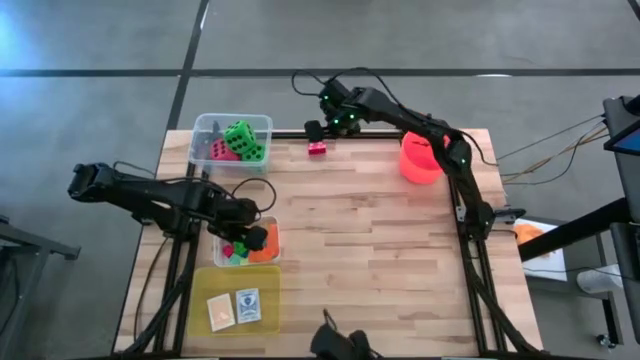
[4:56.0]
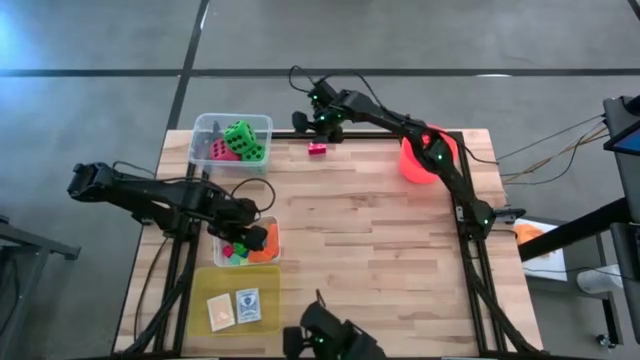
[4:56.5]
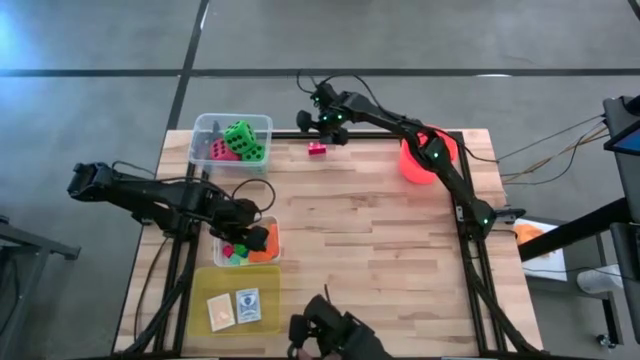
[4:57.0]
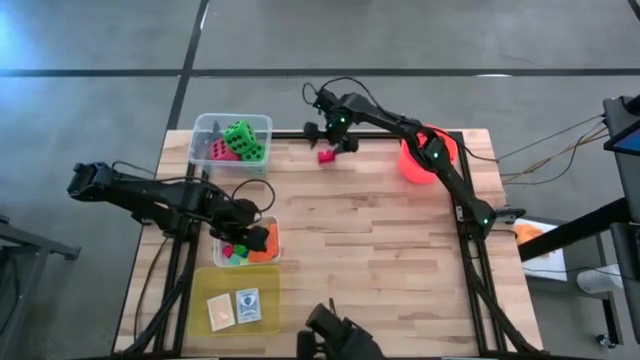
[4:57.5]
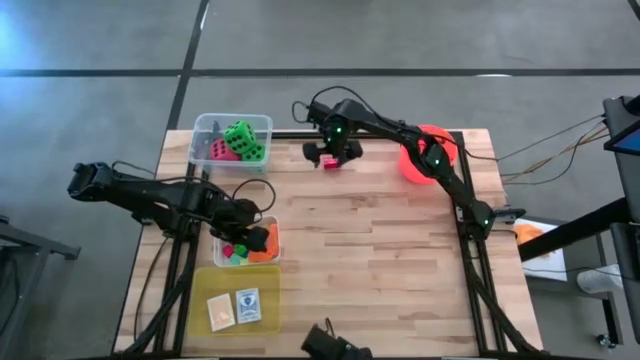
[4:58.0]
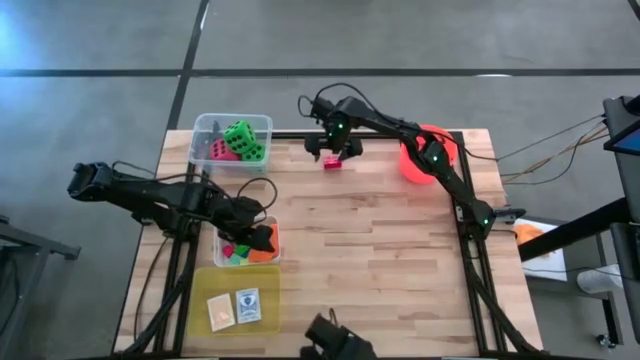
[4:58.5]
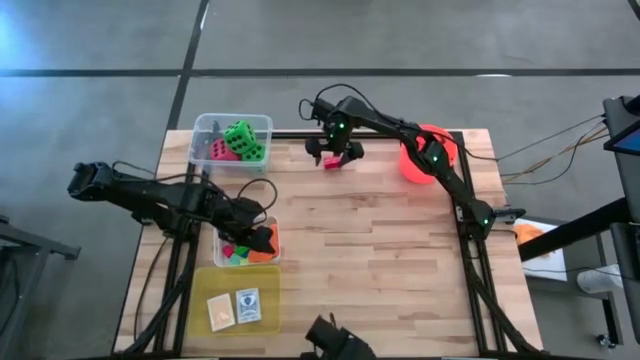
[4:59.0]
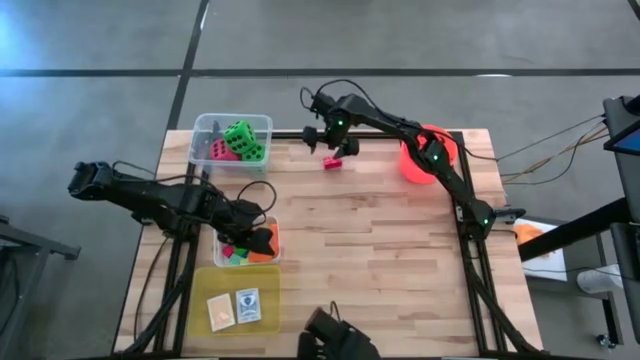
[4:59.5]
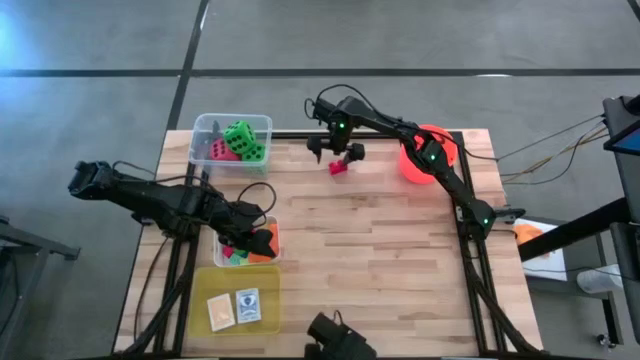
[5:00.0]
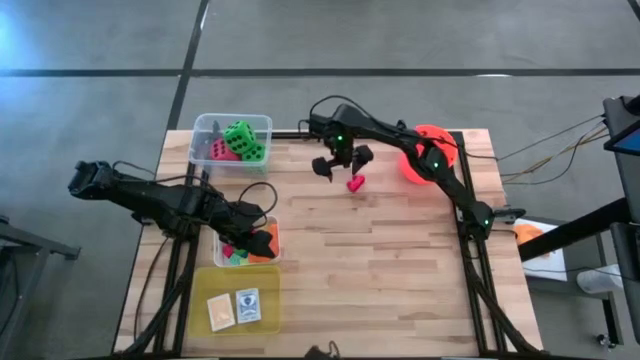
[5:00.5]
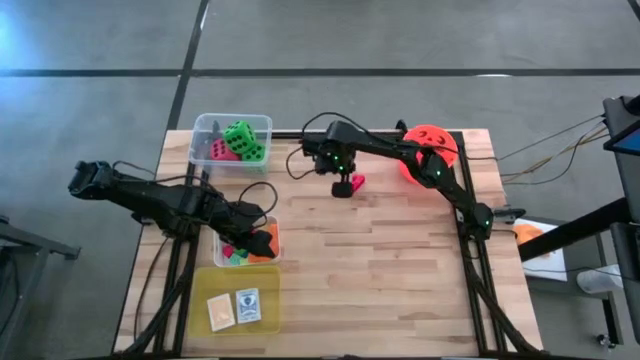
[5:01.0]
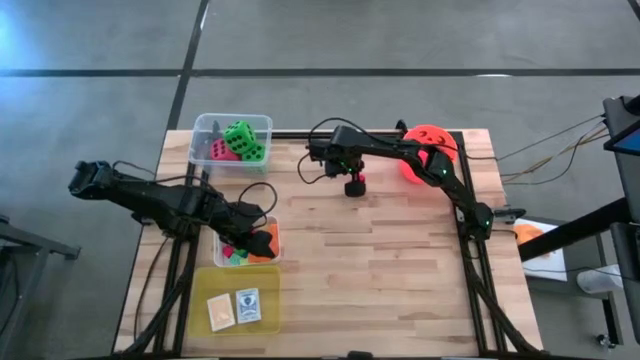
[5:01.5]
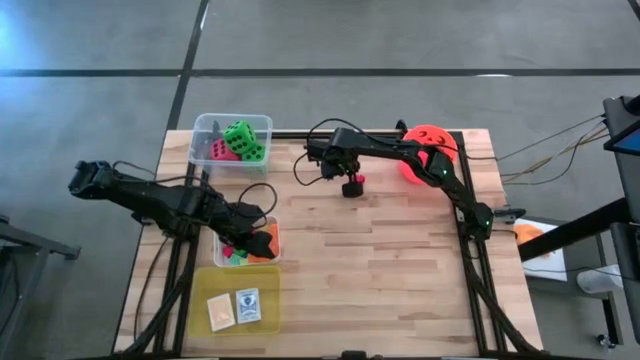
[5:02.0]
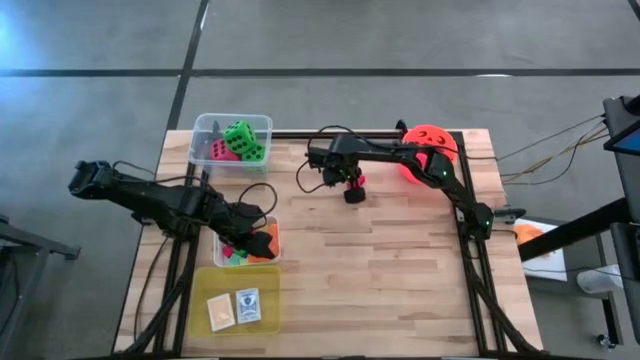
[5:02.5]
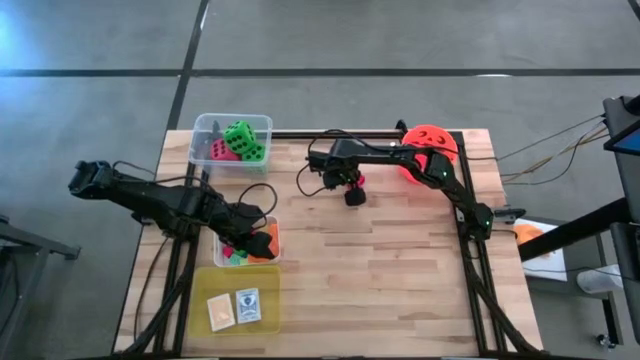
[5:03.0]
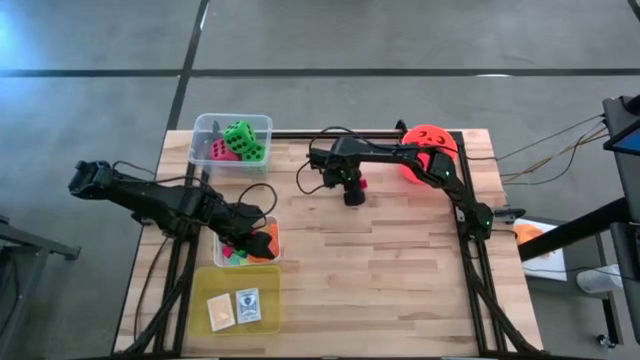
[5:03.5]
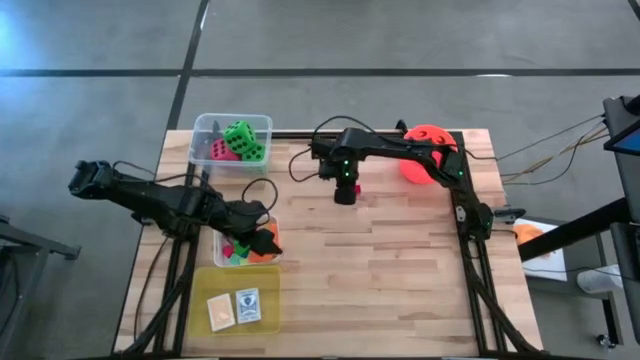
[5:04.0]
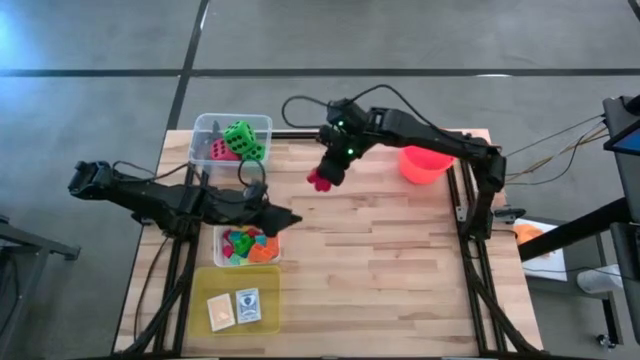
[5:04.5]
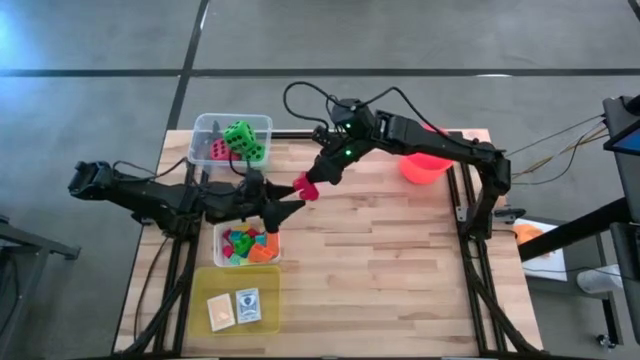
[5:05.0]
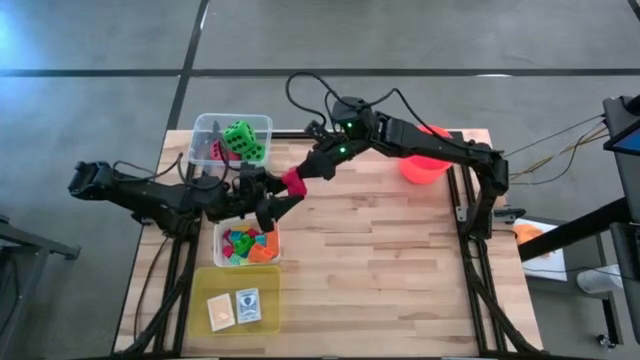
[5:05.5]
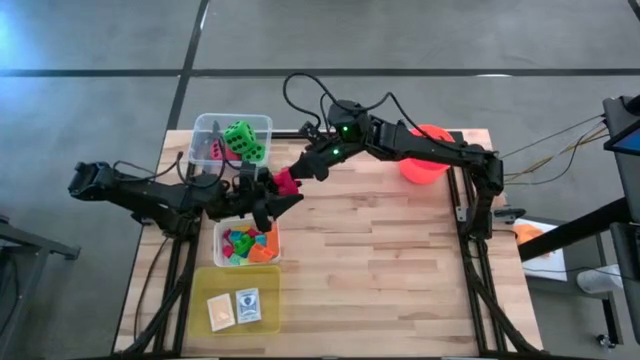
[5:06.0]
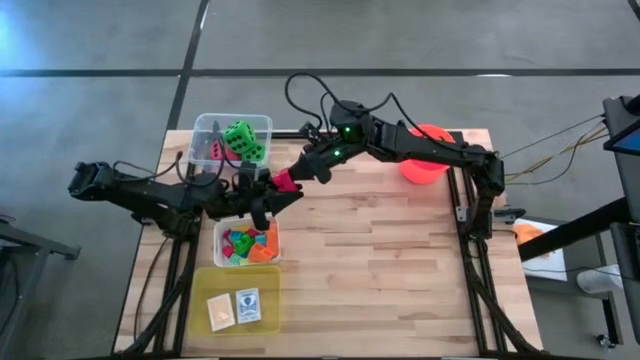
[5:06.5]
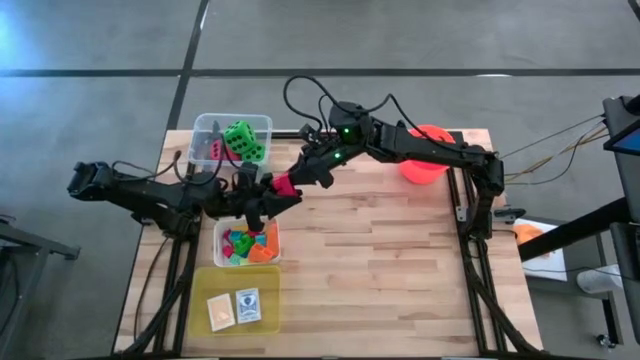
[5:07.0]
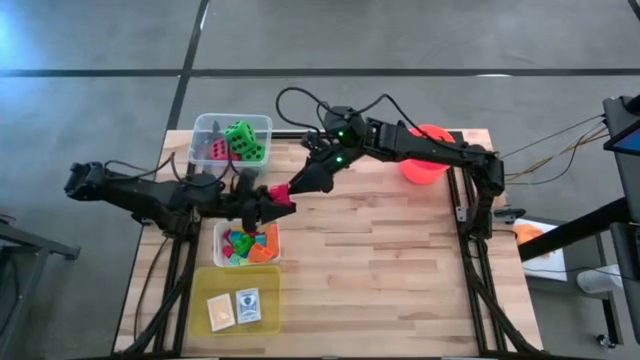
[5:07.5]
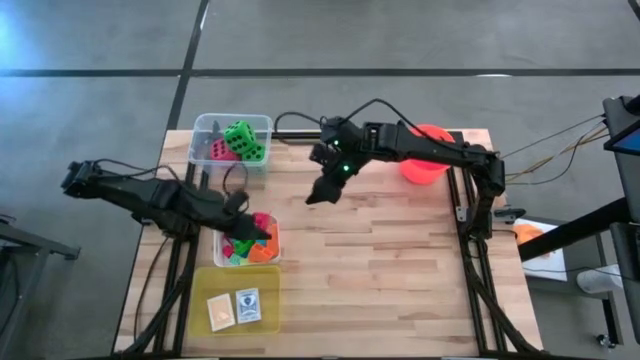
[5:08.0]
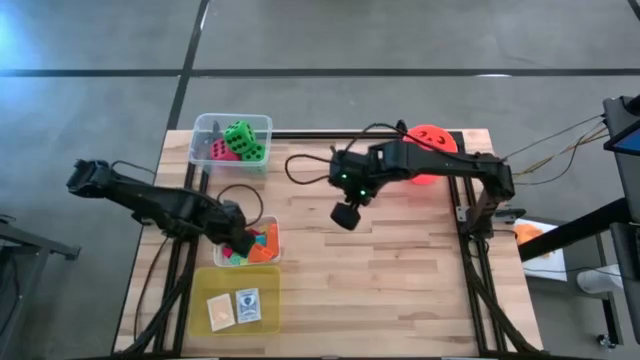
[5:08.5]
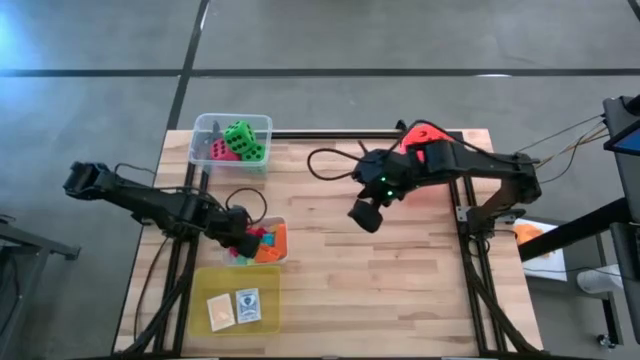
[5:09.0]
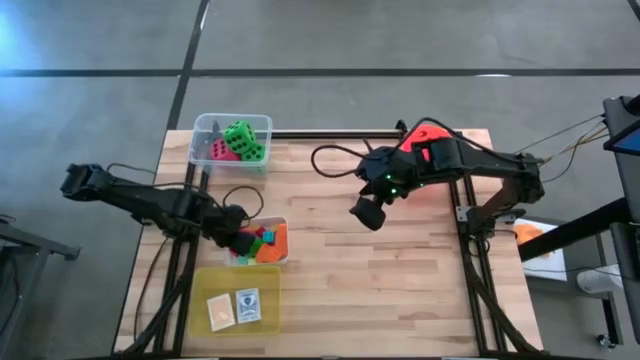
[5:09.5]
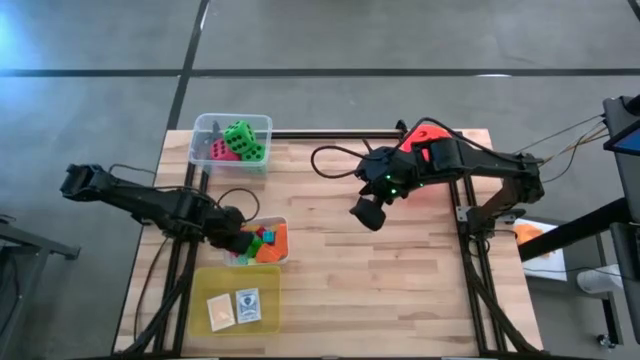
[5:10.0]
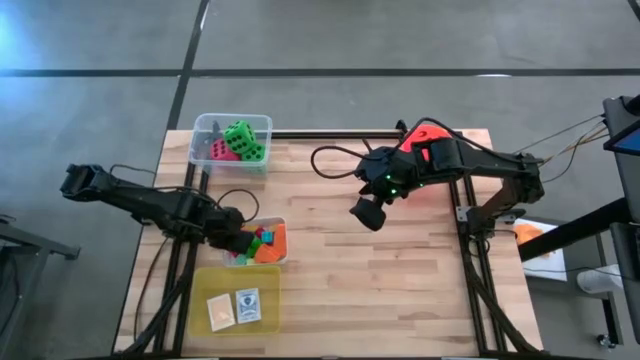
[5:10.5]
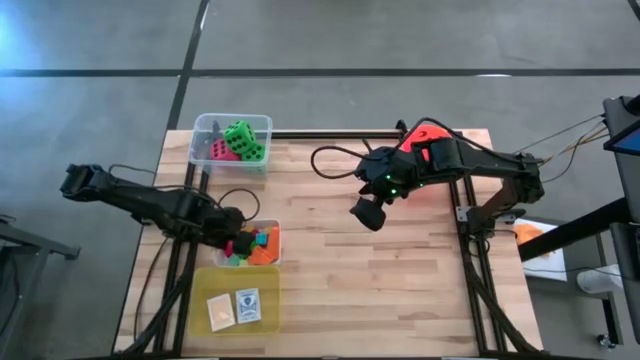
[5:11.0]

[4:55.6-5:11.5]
Task: Pick & Place Toys
Put the red game piece into the white bin

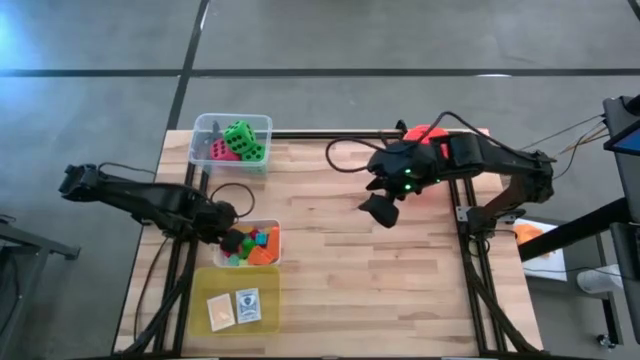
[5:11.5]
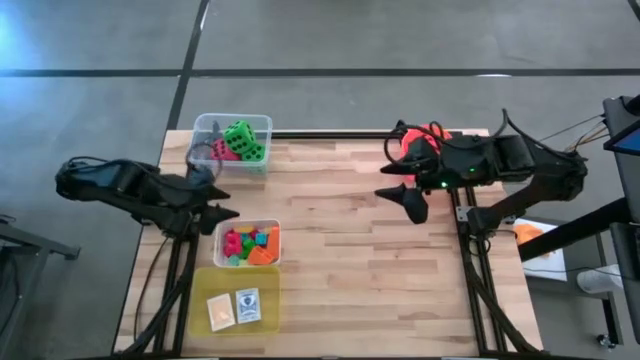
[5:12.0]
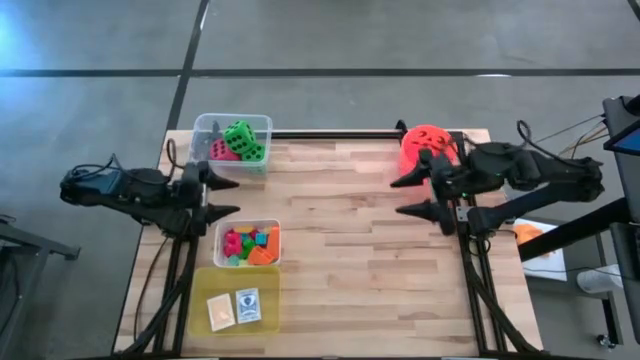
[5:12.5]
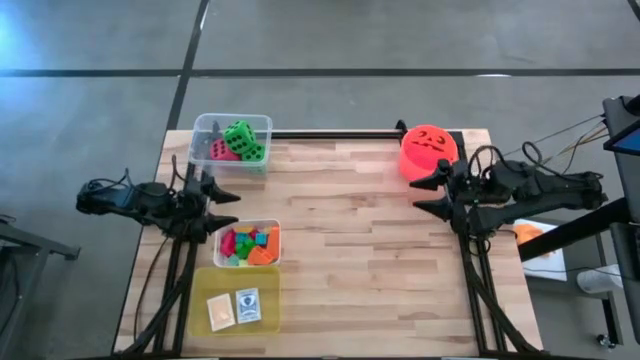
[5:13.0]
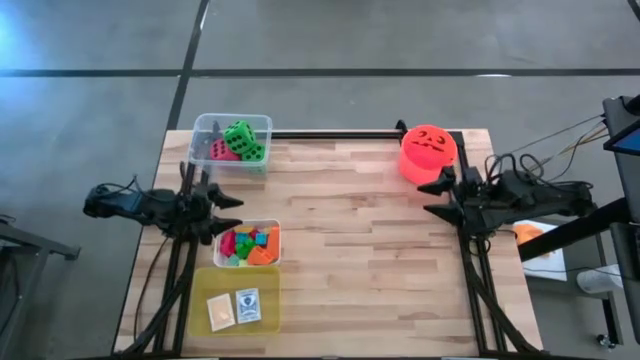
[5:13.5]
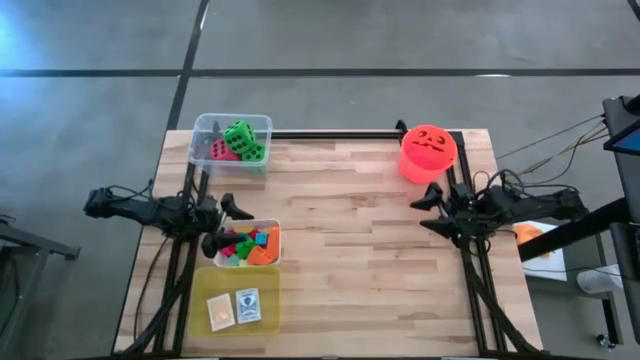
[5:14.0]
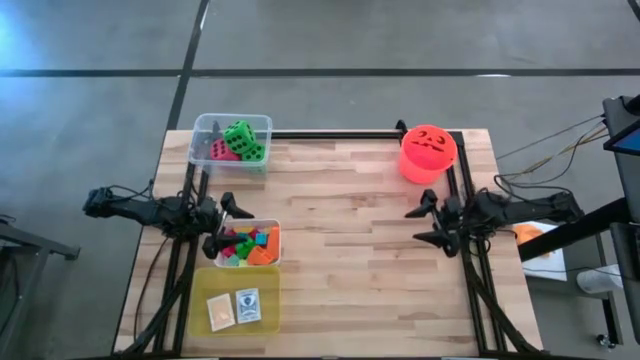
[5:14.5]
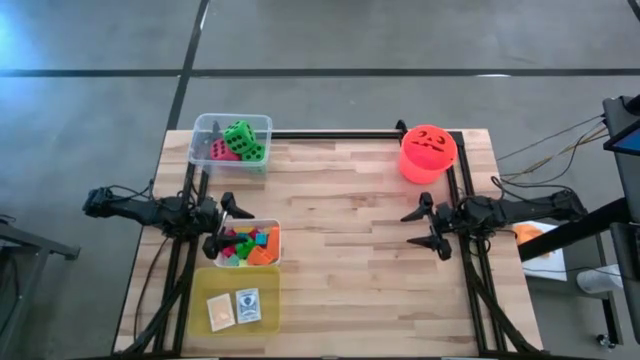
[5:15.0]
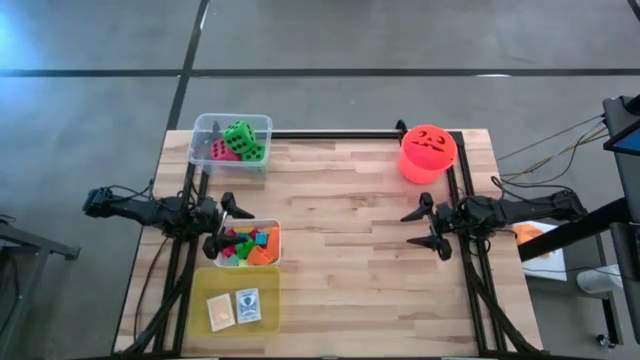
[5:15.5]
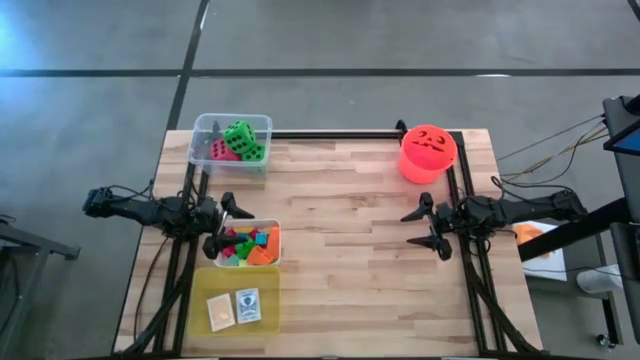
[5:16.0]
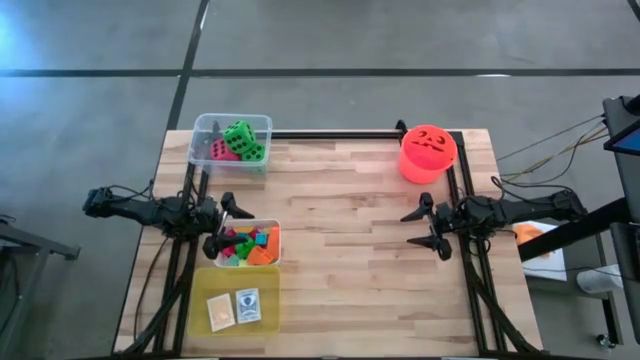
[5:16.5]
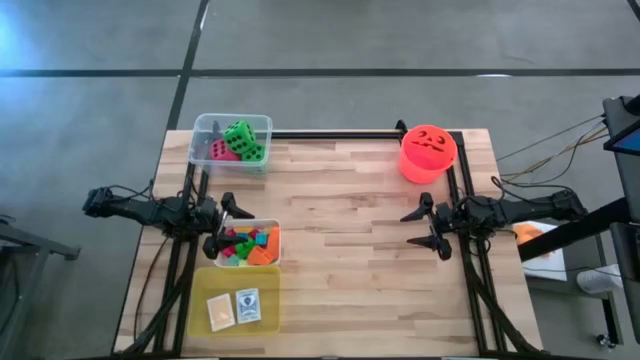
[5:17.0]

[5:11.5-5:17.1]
Return to Home Position
